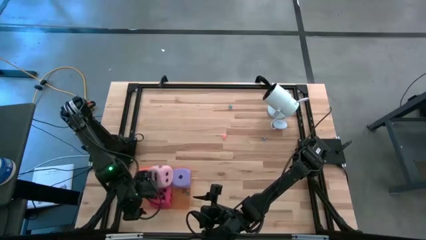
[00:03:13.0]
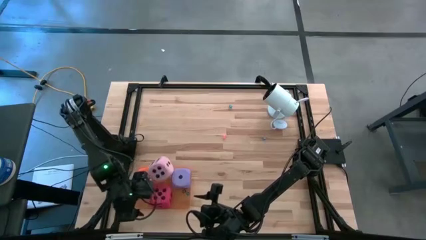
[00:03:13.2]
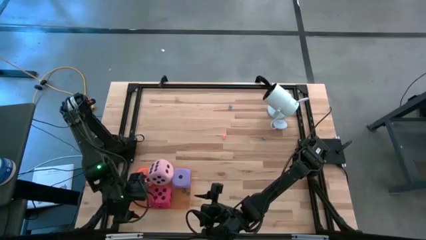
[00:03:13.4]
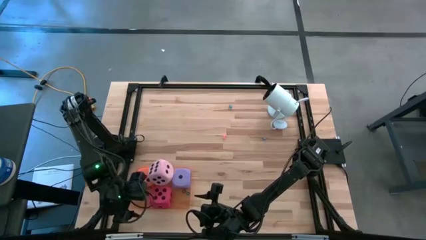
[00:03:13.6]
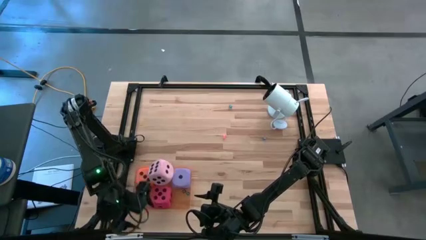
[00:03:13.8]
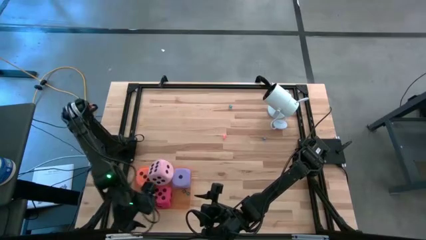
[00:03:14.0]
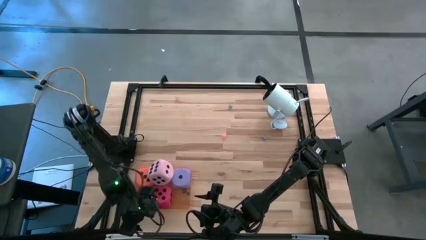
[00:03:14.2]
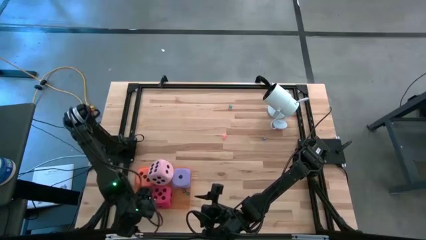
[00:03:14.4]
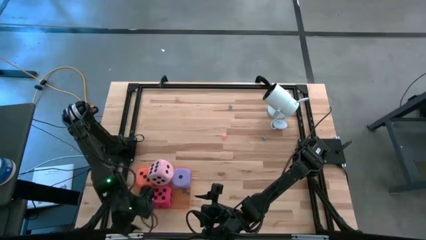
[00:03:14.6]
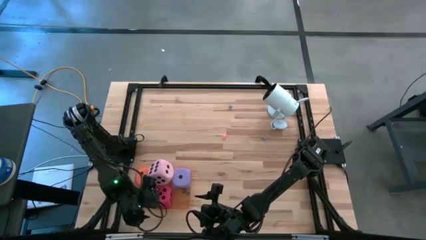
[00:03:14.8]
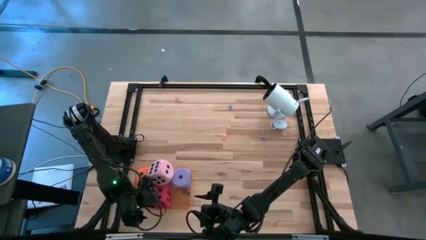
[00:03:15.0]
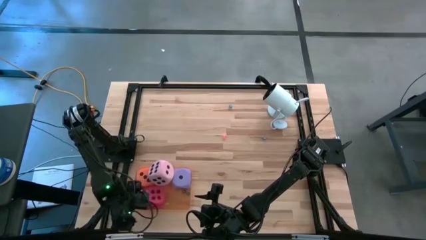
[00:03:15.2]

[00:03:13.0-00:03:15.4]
Task: Pick & Place Dice
Adjust the large red dice in the orange bin

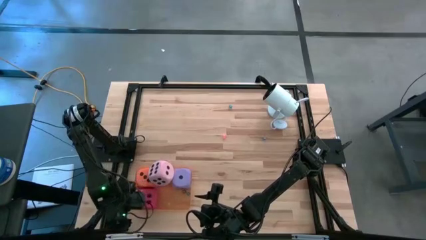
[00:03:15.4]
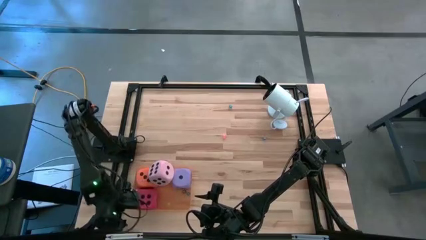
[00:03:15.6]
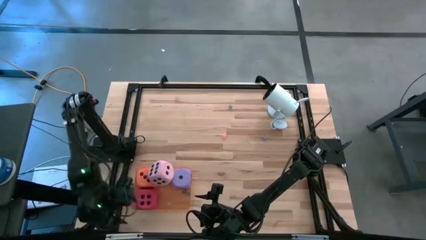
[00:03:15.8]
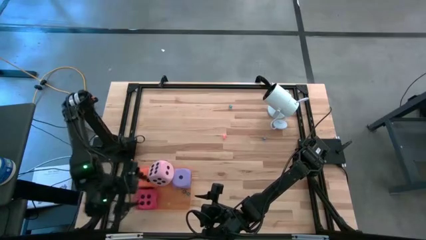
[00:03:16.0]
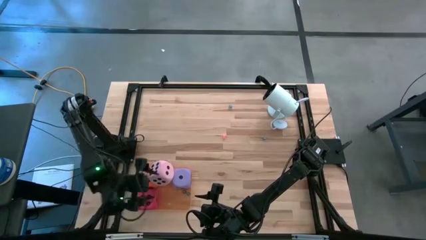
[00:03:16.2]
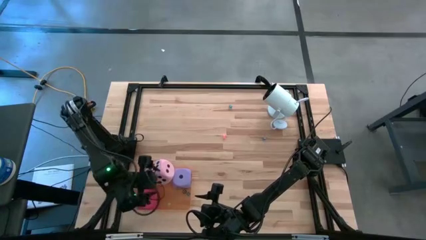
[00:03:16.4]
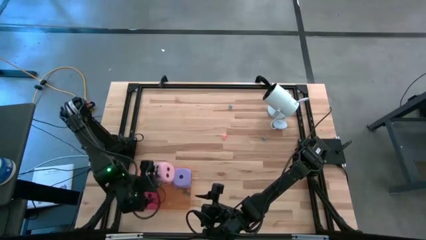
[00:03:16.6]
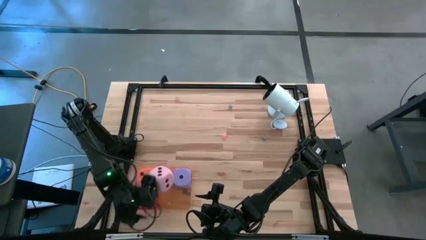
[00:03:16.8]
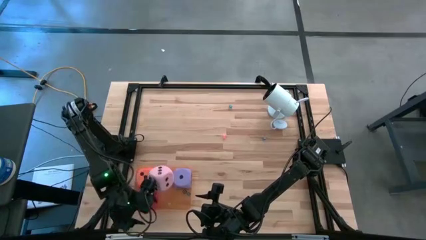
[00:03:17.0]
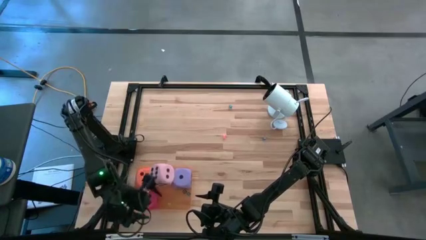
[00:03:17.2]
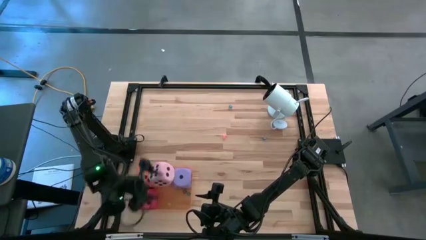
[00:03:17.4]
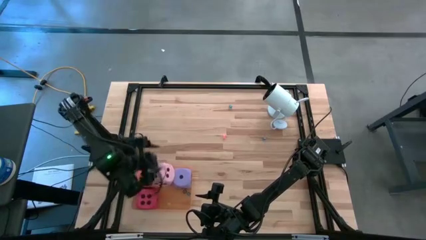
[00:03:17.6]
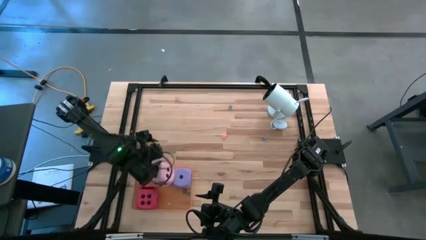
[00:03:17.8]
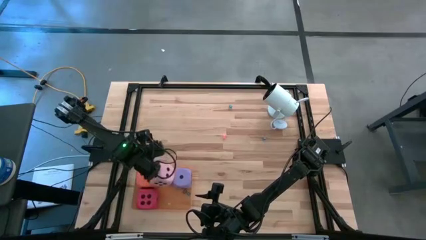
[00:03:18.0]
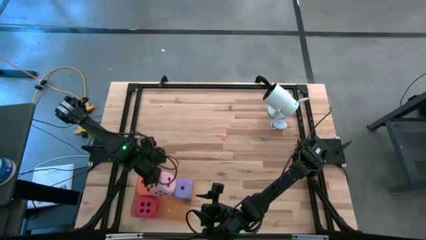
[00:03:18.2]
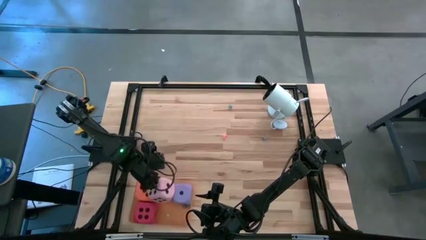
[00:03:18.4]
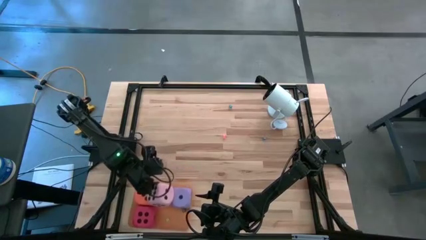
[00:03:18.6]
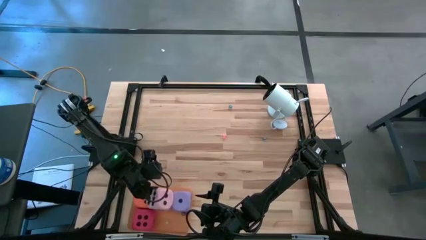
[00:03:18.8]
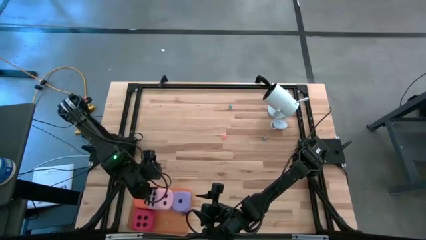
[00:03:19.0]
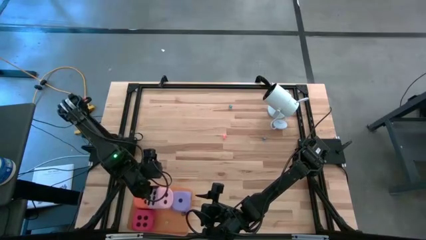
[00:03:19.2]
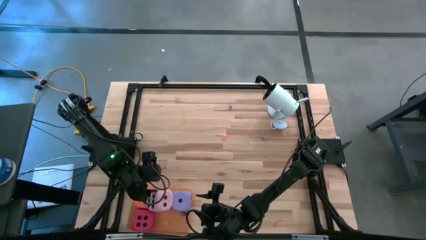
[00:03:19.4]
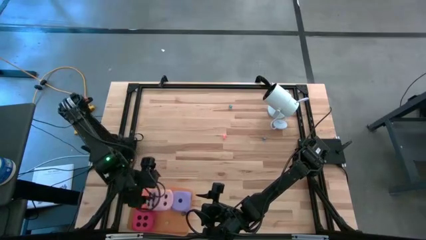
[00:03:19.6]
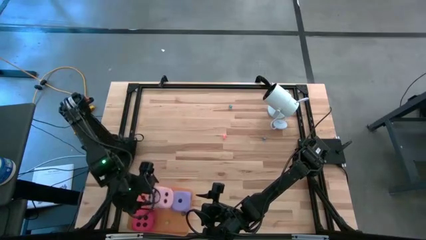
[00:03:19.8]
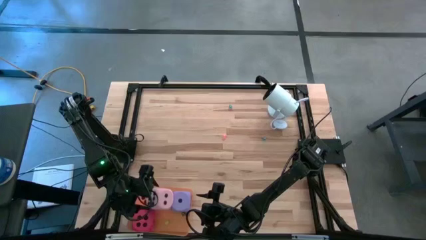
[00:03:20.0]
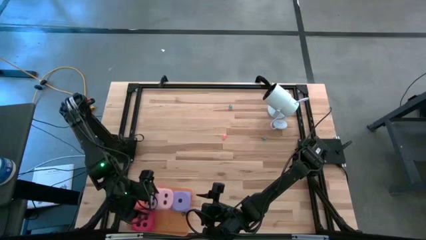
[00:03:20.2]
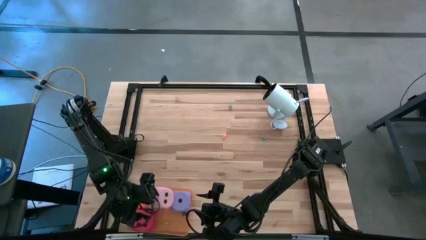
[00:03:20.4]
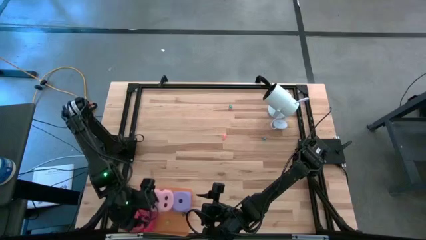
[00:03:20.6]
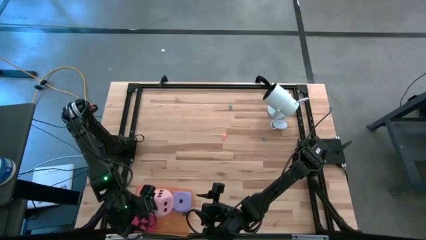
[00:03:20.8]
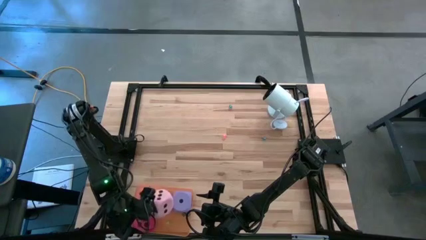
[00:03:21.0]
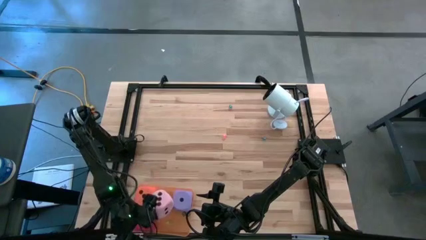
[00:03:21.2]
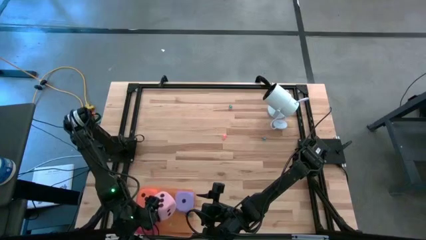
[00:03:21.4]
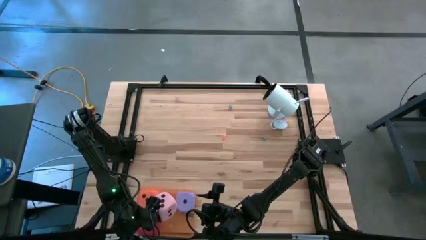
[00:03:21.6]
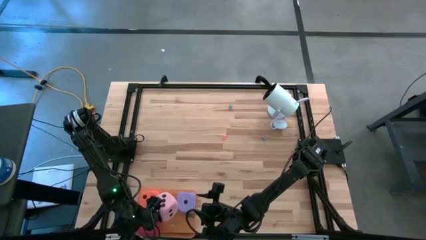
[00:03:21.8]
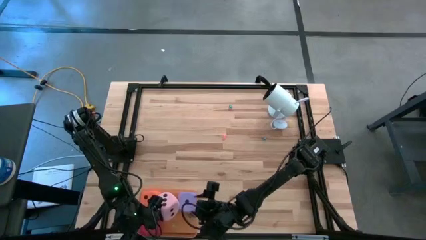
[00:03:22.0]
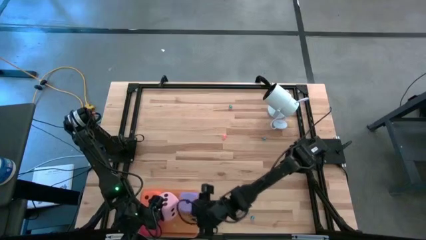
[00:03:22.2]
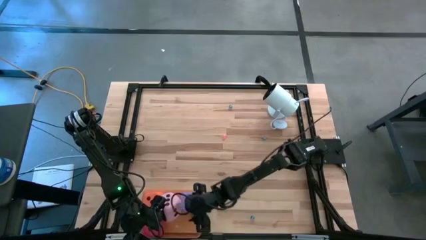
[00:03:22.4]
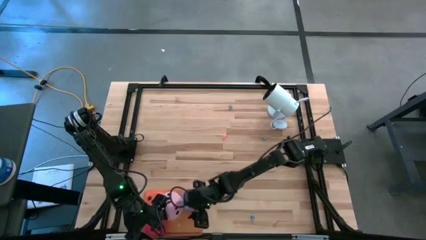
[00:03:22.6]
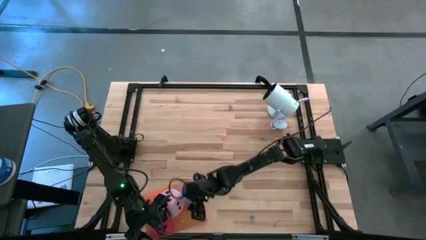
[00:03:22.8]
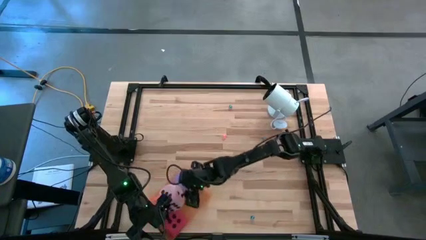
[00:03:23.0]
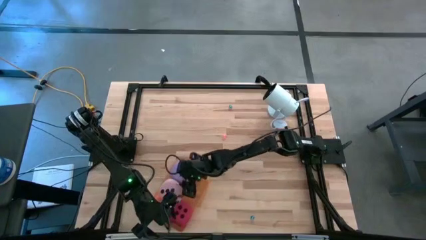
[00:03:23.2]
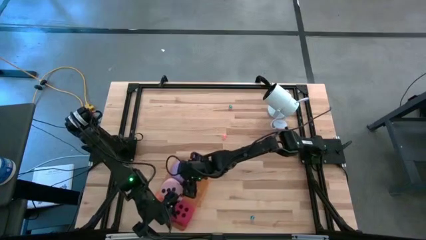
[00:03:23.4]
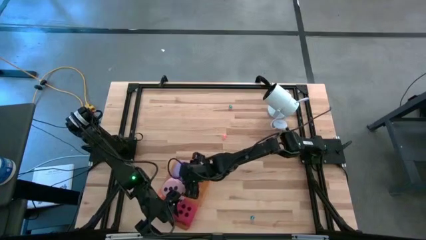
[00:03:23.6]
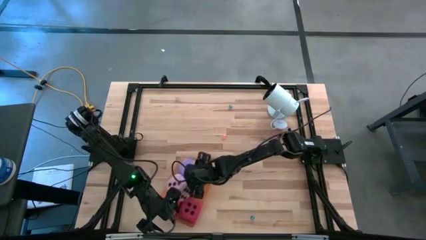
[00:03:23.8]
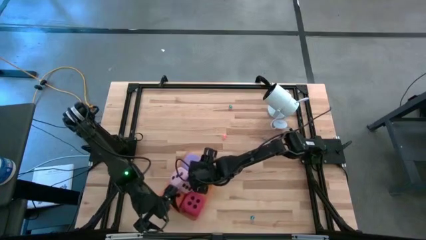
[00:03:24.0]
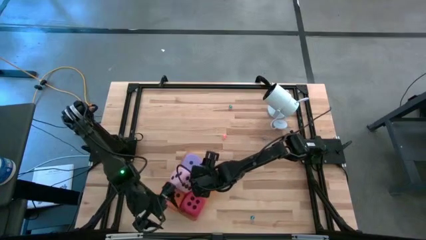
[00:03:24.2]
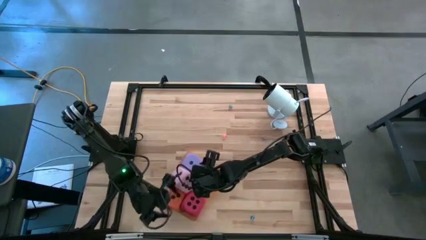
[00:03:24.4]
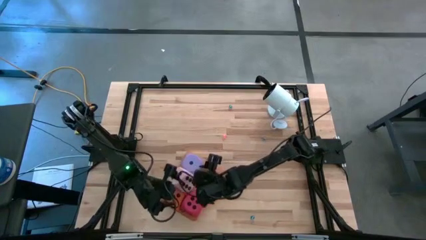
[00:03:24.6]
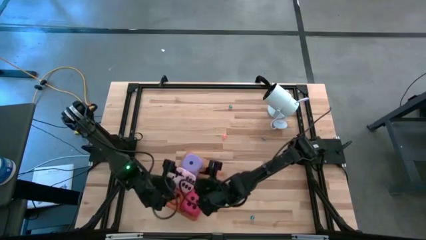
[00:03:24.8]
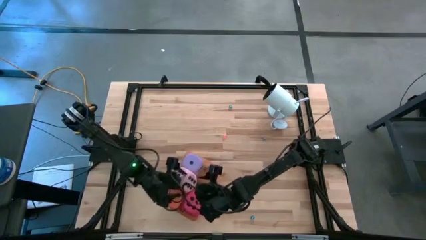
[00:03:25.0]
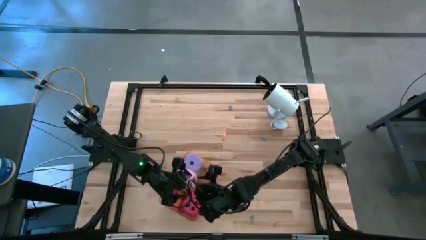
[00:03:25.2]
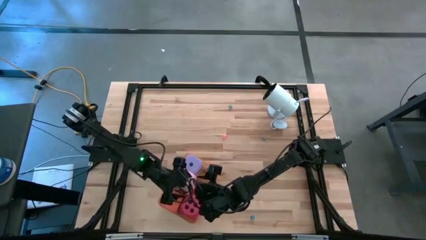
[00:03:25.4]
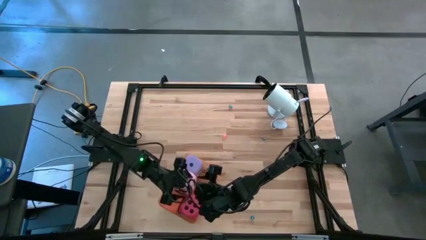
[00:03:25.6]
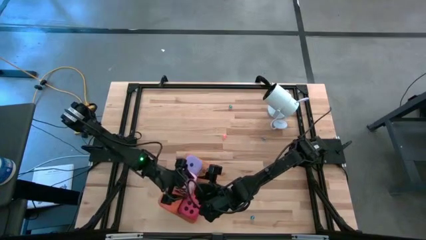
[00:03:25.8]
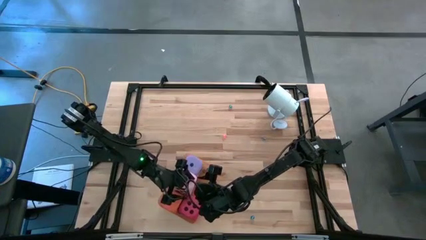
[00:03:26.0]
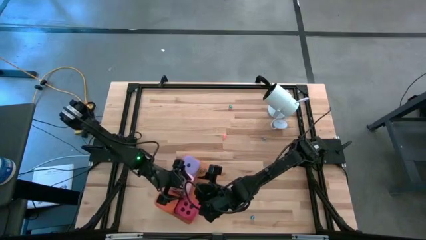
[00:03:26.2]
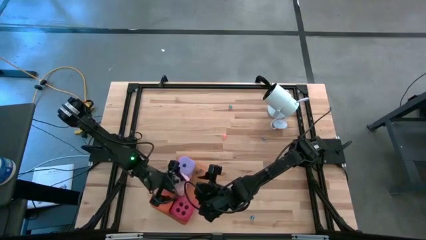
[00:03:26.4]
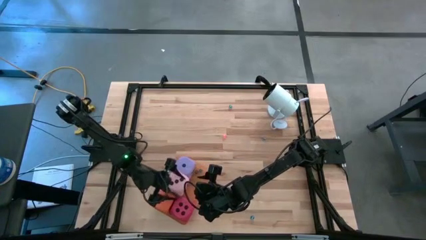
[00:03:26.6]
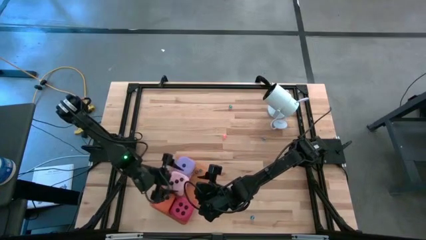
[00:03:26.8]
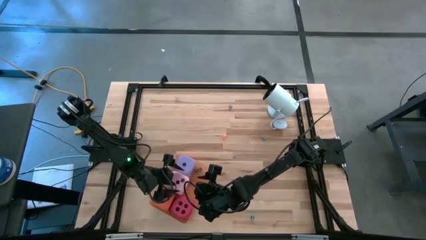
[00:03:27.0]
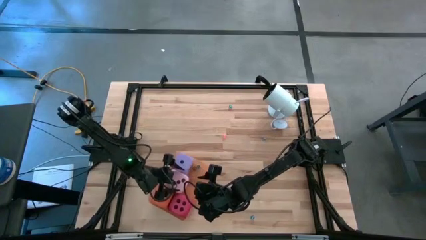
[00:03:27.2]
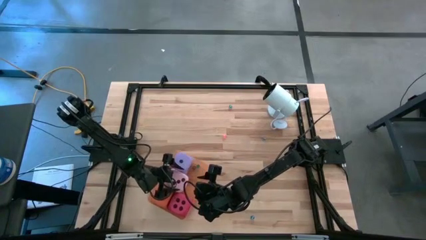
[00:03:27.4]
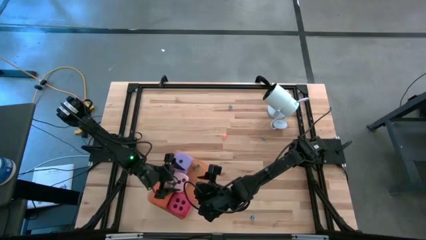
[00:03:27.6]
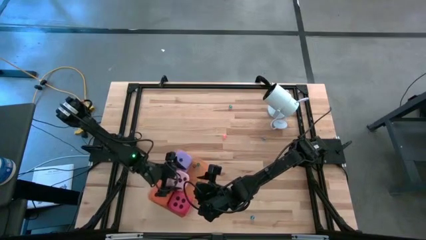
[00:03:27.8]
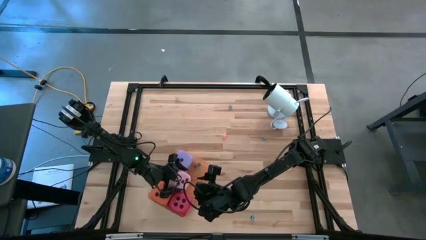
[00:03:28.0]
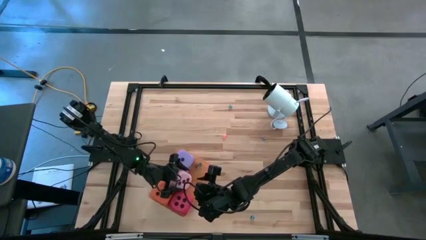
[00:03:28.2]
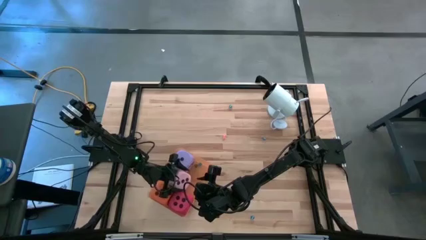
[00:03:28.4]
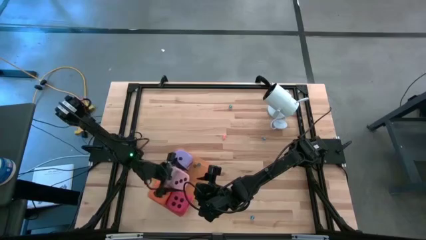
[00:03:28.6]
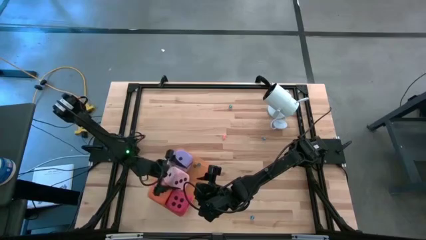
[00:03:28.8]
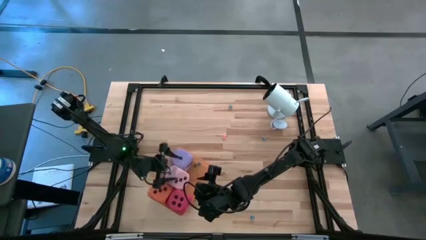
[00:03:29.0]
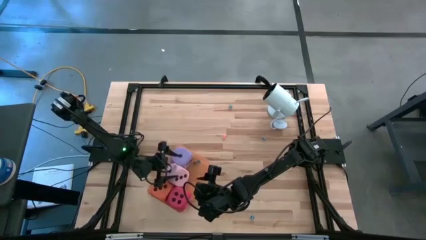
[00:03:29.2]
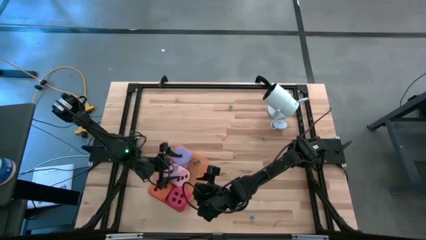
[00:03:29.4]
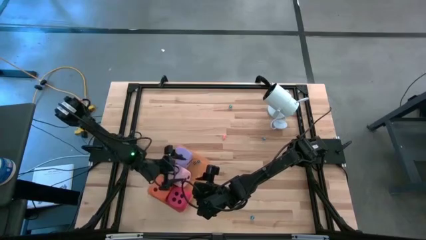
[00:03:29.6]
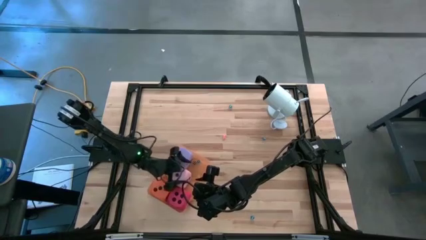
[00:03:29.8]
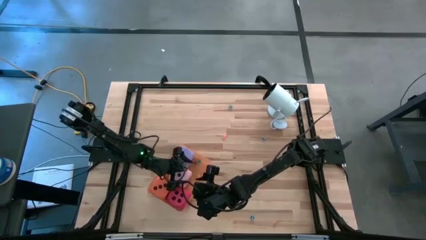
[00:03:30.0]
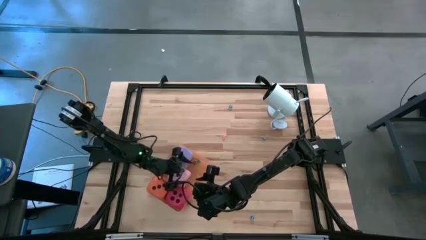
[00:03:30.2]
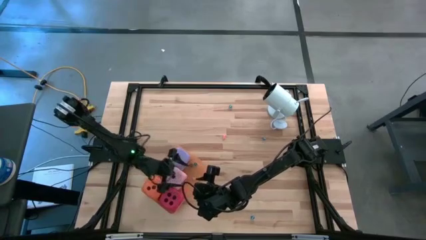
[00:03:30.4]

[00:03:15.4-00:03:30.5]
Adjust the large pink dice in the orange bin
